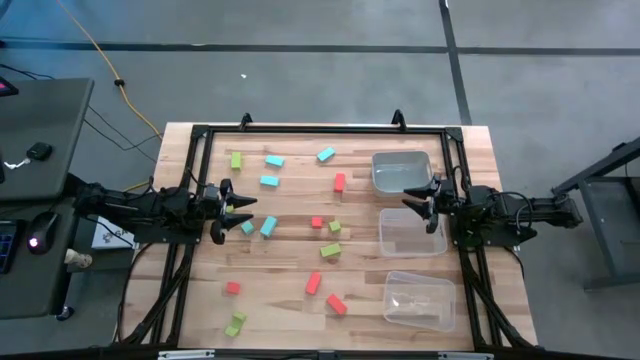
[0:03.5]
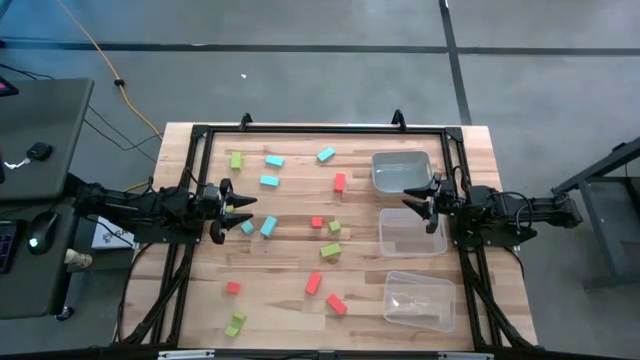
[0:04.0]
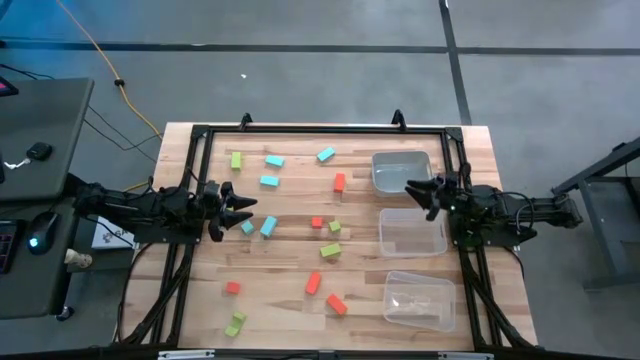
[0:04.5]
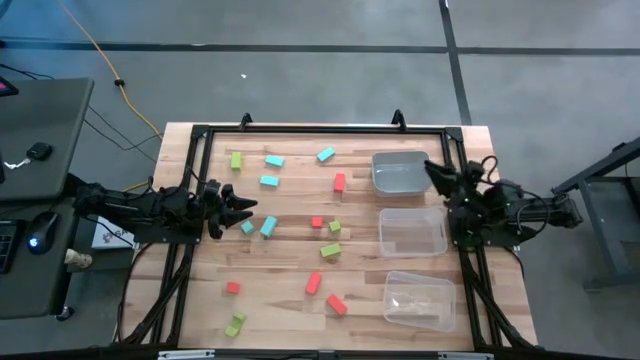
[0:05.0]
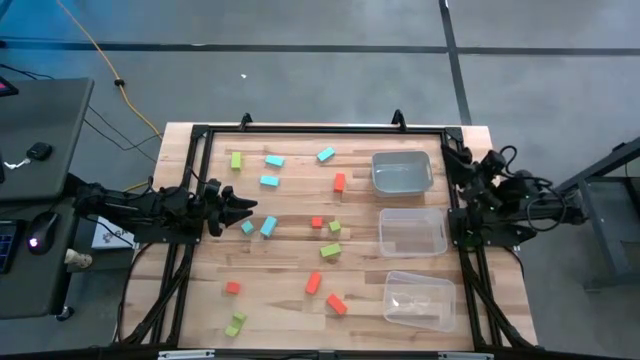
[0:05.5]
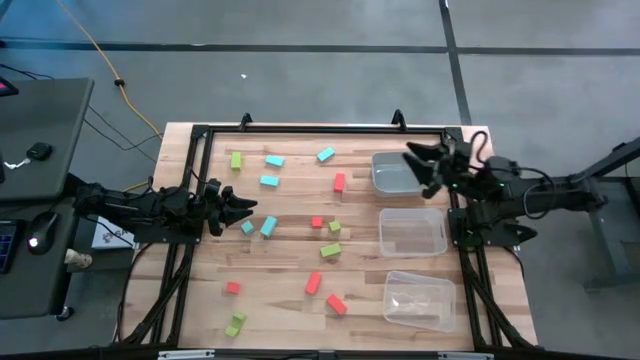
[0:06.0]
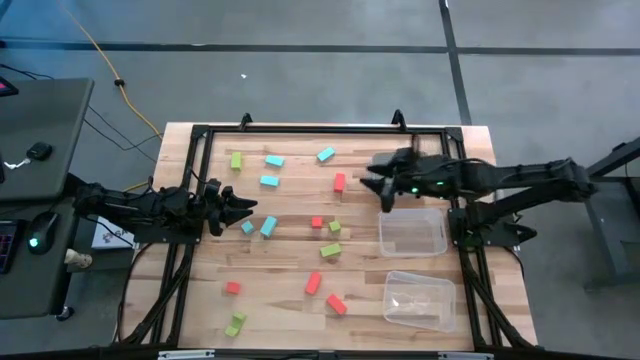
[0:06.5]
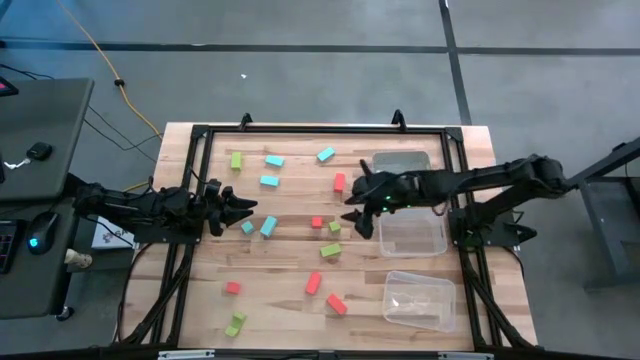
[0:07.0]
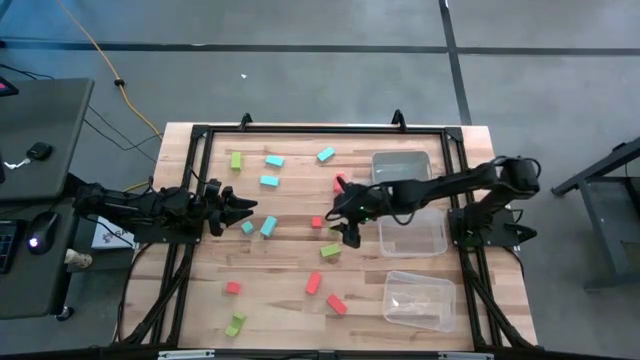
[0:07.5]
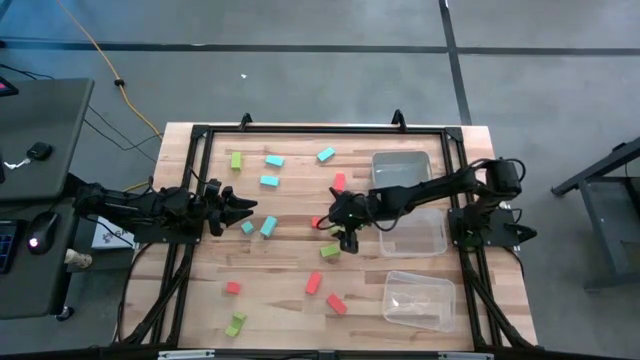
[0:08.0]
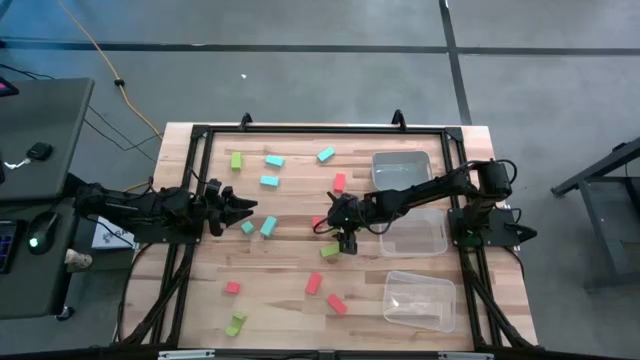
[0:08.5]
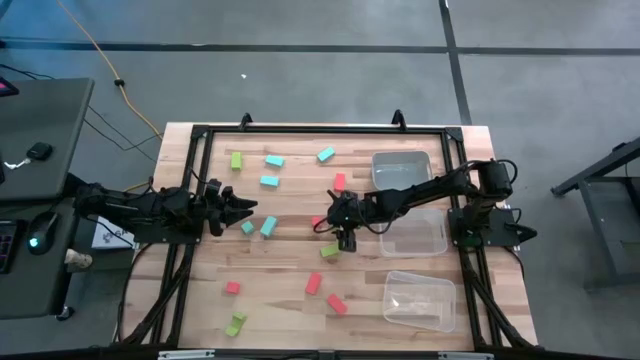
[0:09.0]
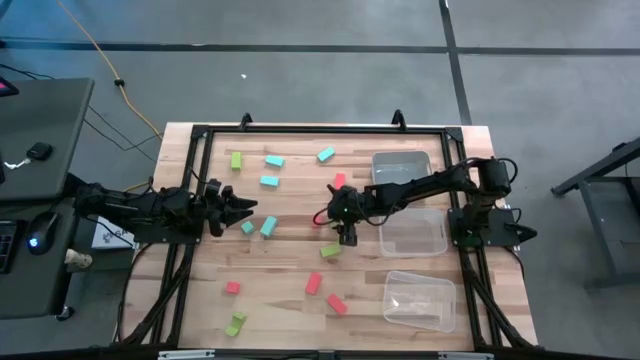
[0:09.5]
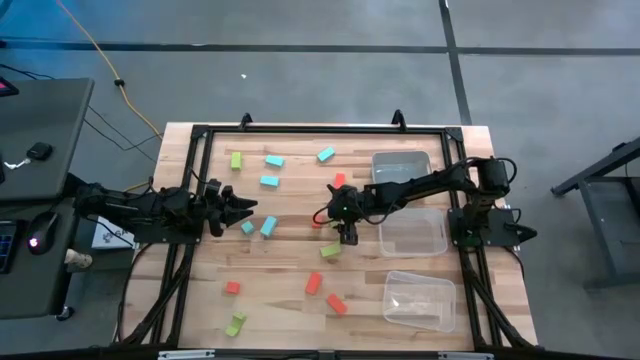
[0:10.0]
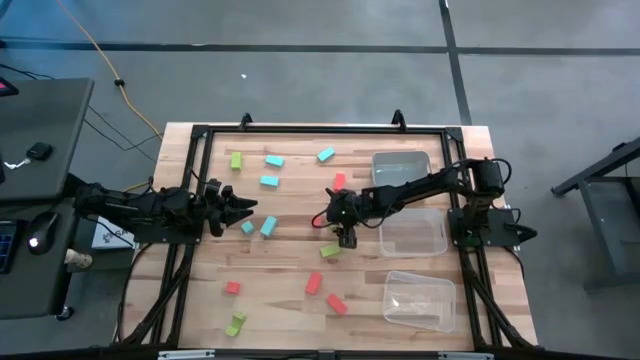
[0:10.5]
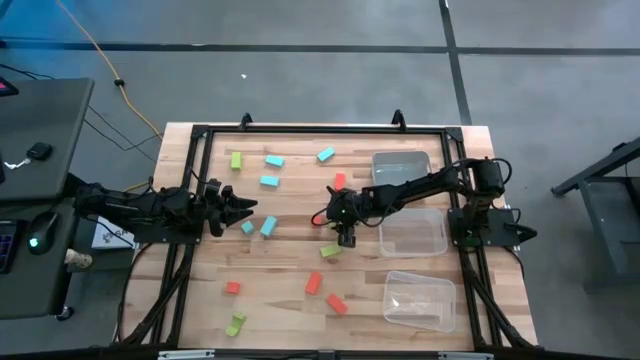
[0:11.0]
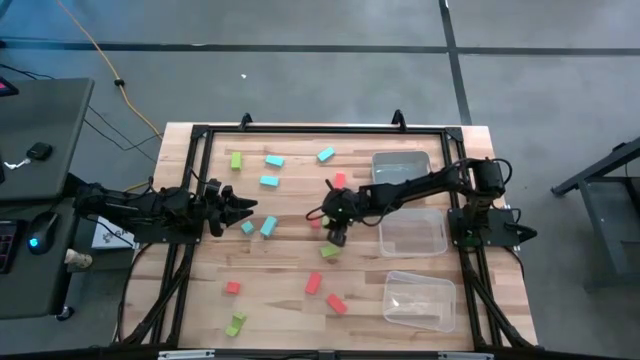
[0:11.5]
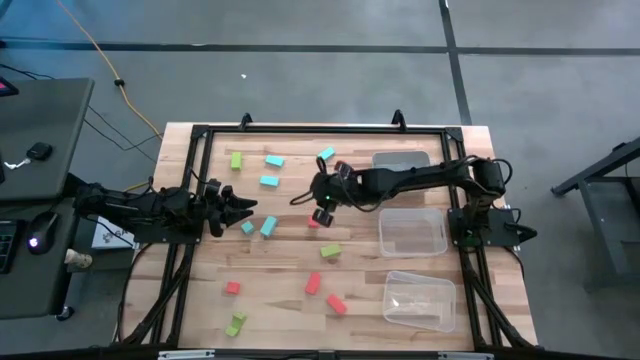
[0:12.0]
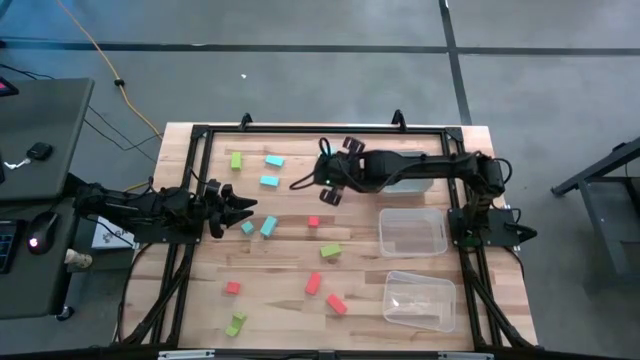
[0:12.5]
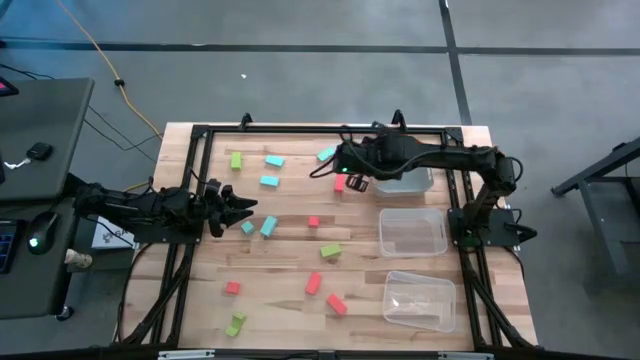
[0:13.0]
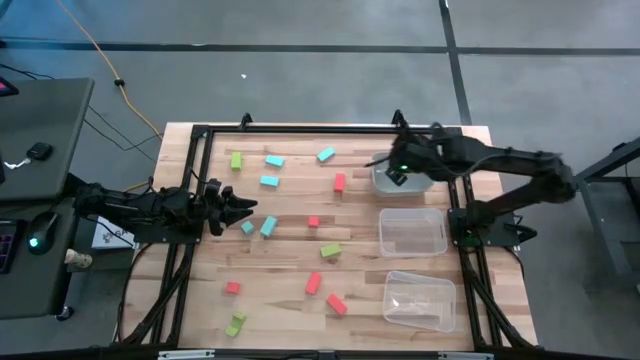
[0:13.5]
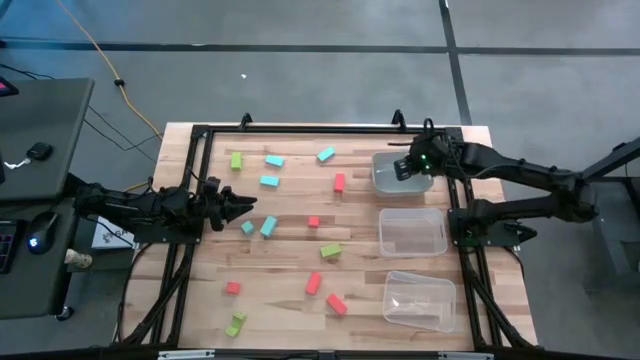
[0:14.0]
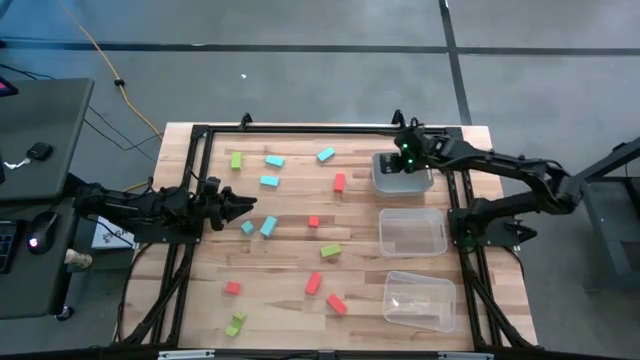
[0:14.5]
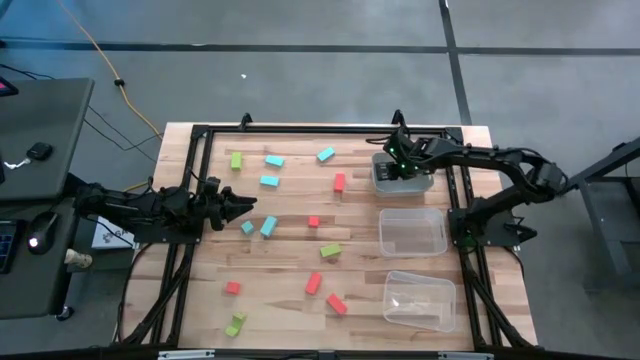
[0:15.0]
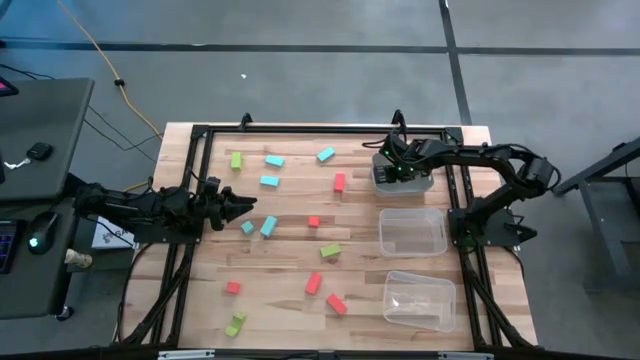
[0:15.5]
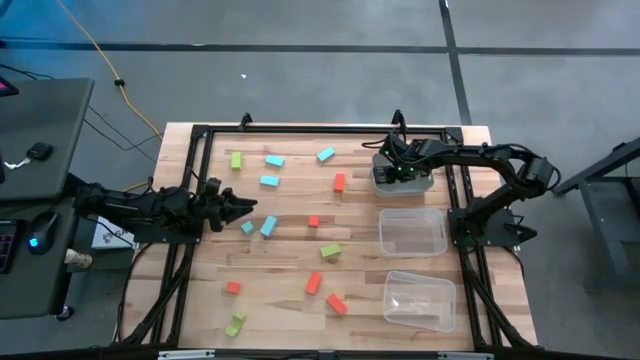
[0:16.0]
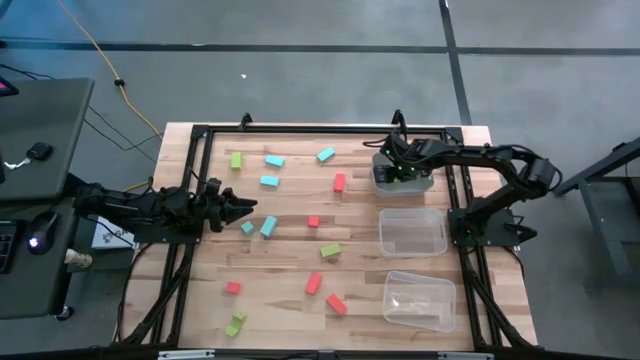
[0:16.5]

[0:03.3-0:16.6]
Task: Sort & place blocks by color
Put the light green block into the gray bin

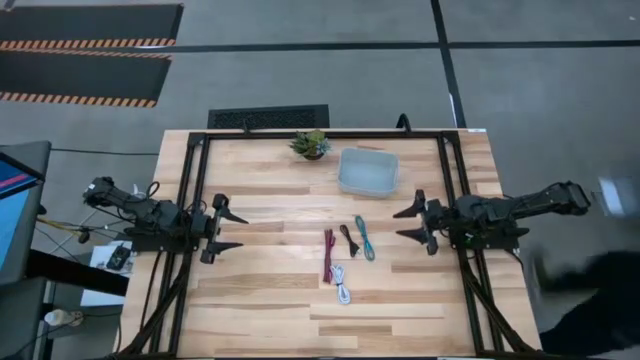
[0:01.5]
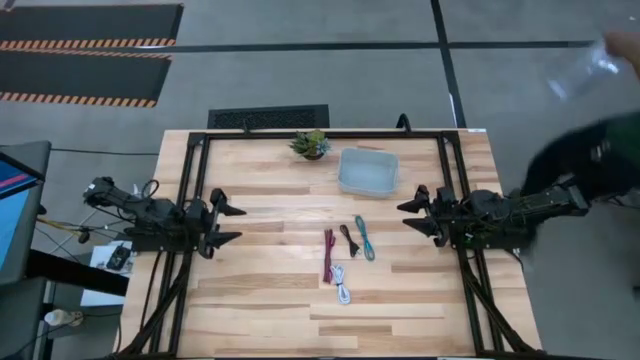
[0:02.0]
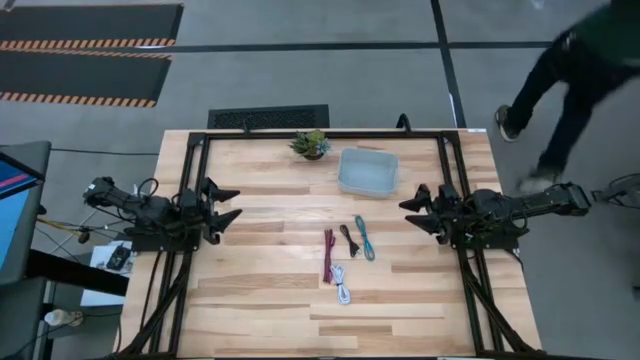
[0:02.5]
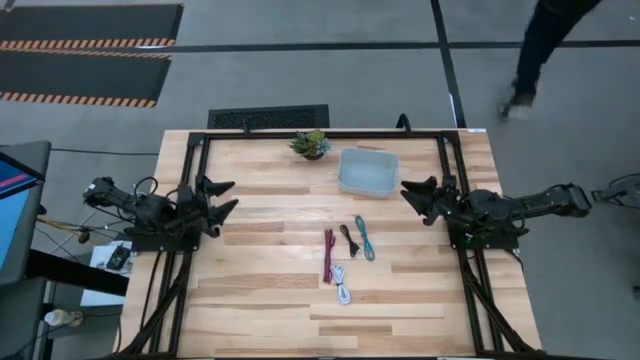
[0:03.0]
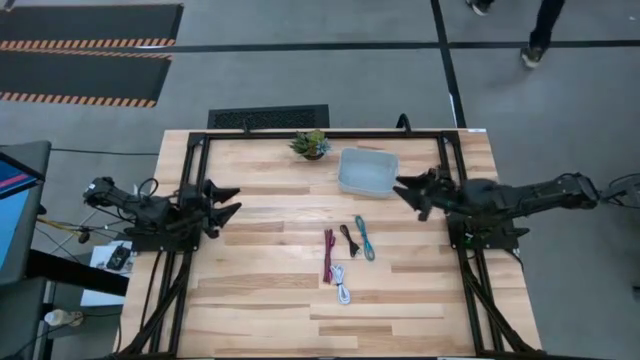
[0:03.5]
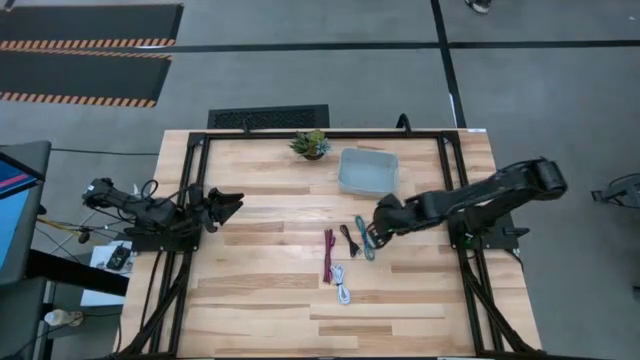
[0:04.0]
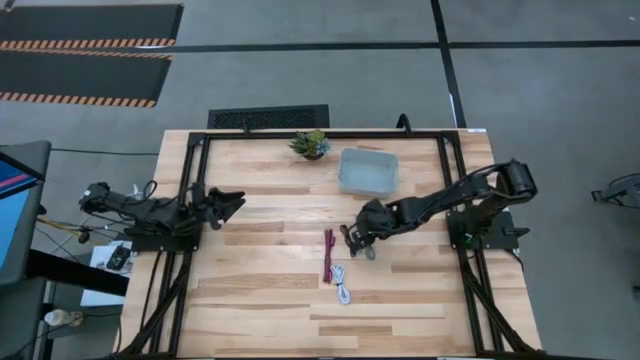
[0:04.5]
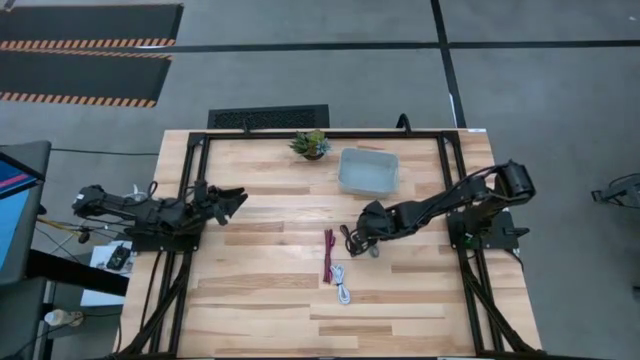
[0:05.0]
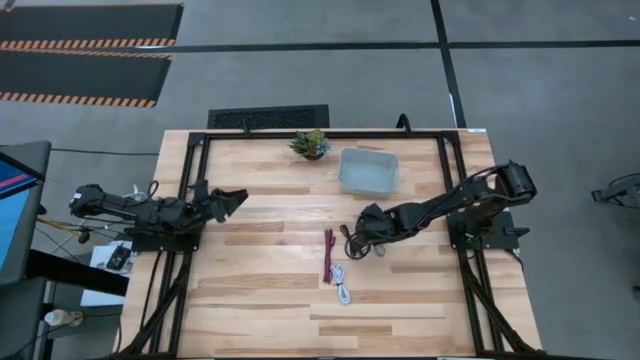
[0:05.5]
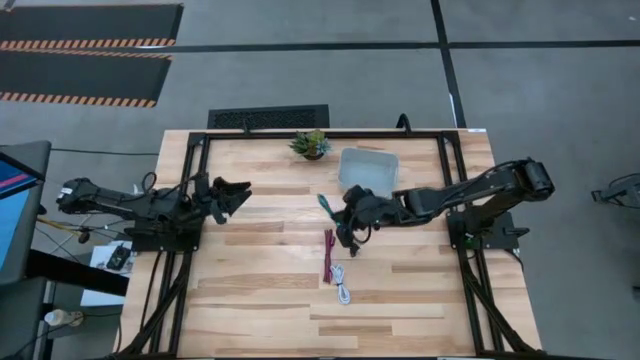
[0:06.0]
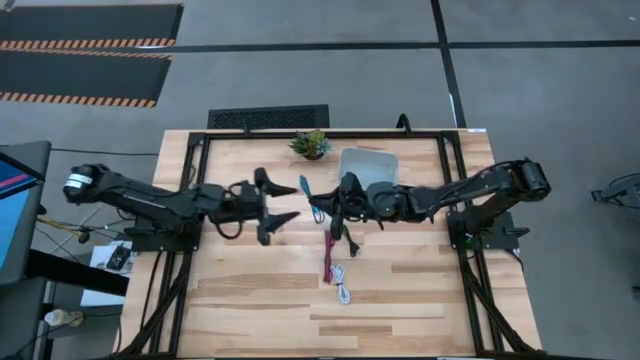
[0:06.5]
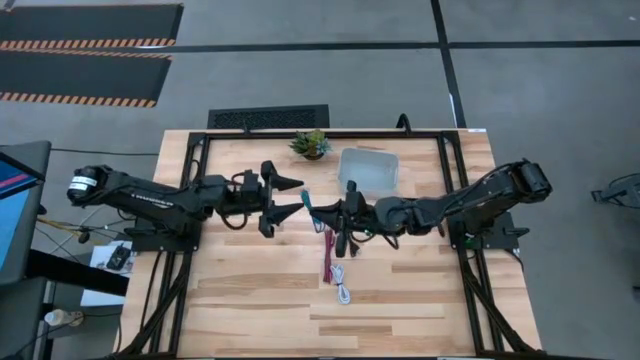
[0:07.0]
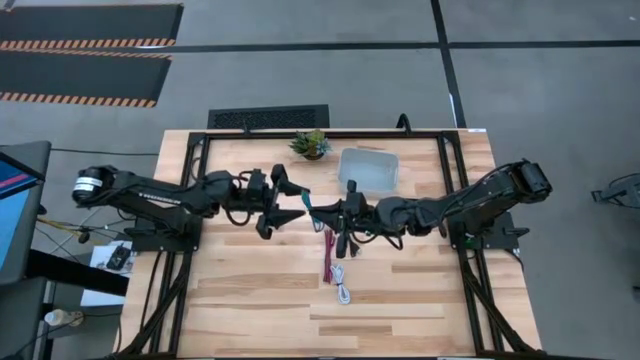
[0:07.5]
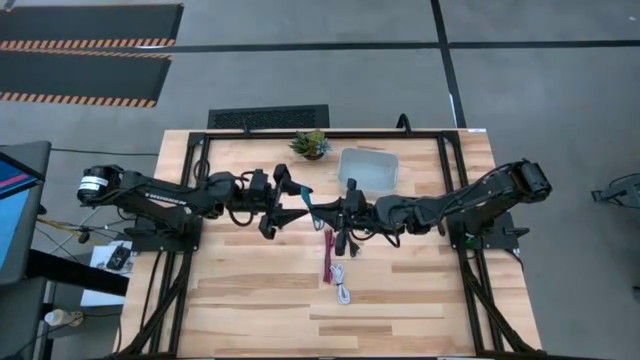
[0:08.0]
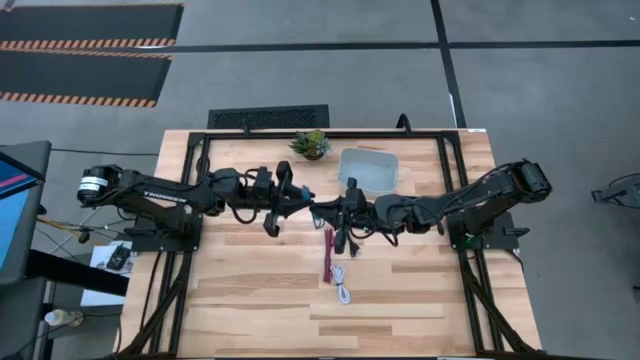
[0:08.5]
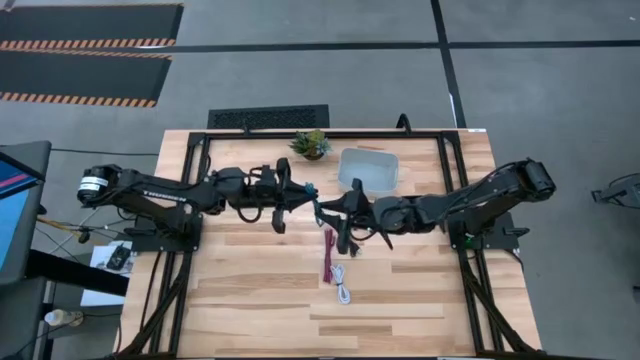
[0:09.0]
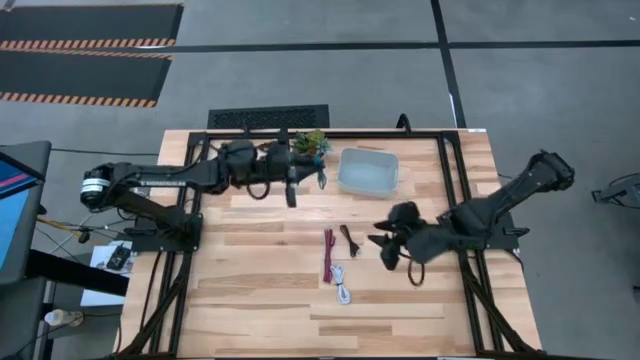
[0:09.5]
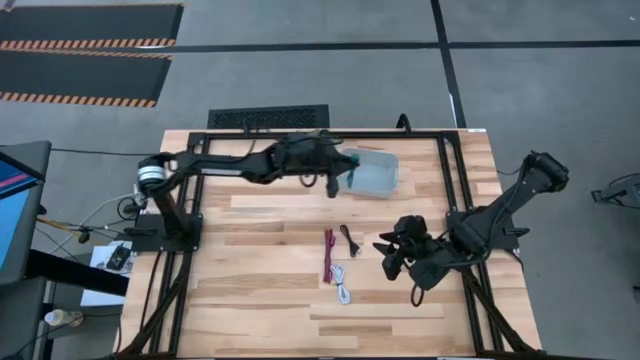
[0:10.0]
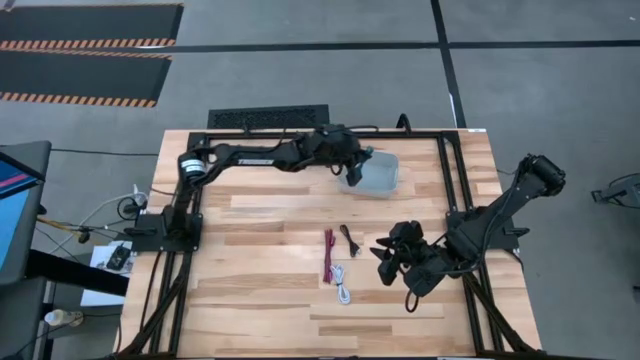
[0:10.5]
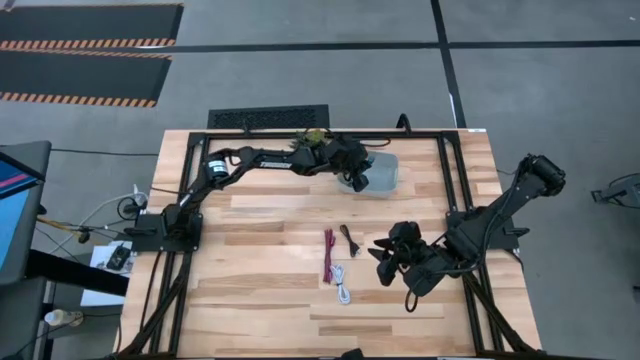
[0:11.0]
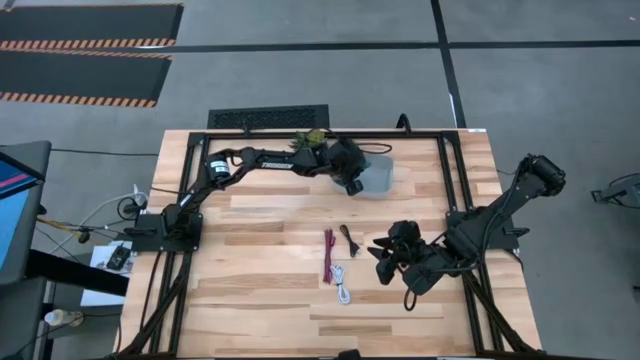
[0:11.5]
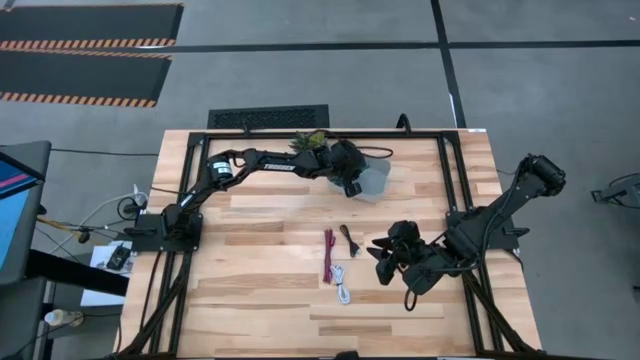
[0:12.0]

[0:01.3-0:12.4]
Task: Pick and place USB-C Cables
Put the blue charger cable into the white bin
